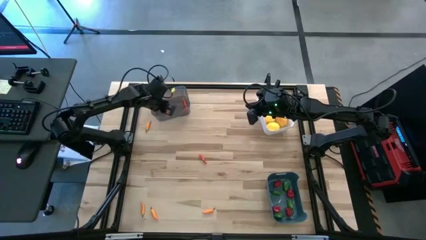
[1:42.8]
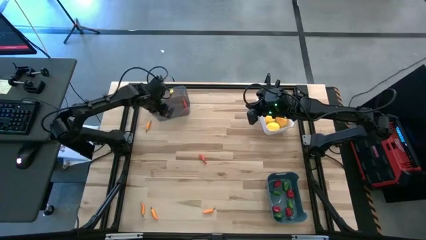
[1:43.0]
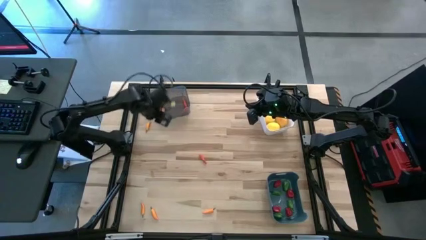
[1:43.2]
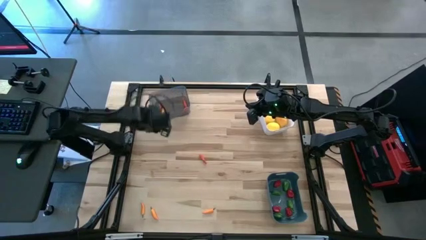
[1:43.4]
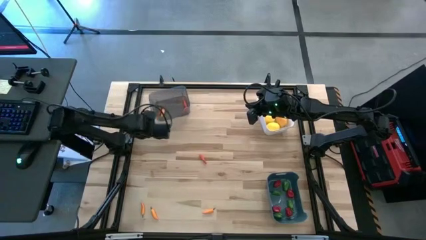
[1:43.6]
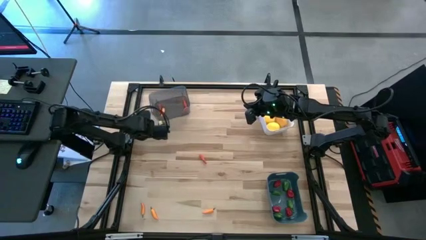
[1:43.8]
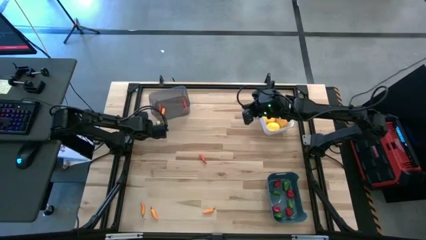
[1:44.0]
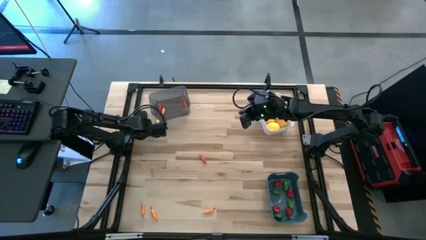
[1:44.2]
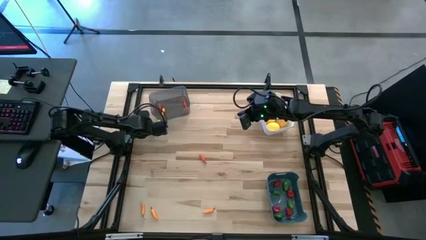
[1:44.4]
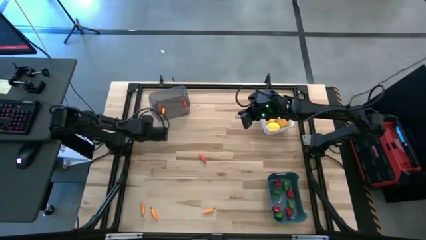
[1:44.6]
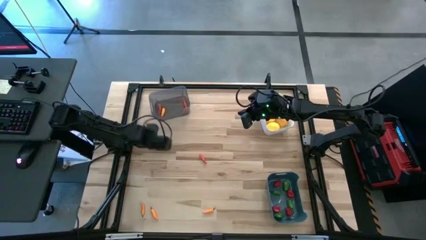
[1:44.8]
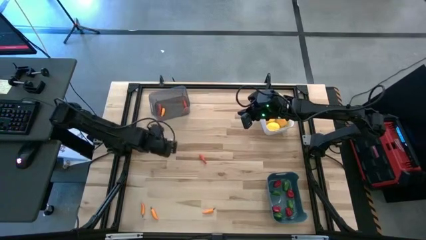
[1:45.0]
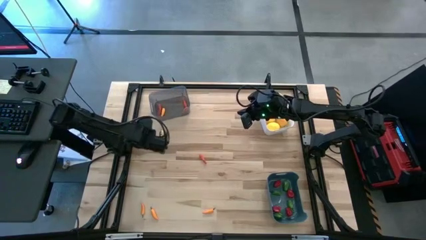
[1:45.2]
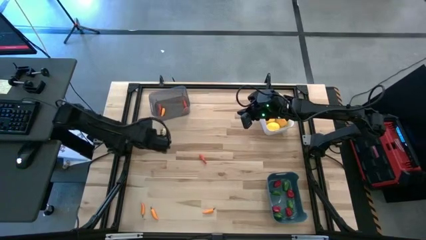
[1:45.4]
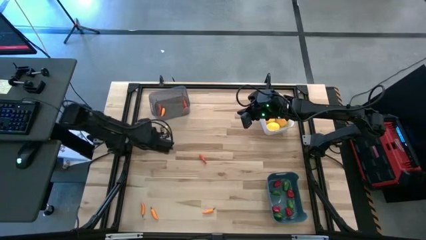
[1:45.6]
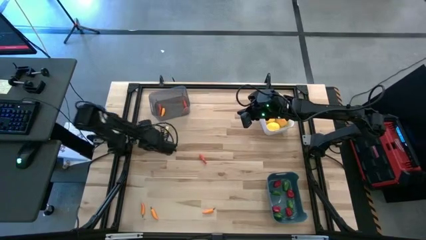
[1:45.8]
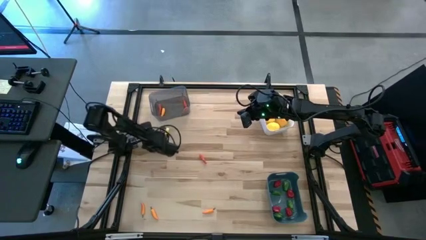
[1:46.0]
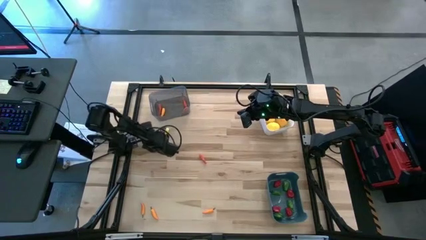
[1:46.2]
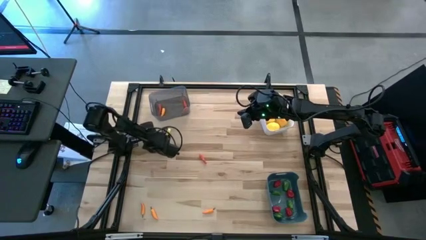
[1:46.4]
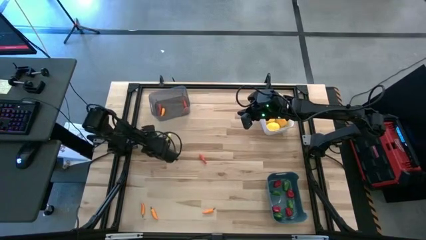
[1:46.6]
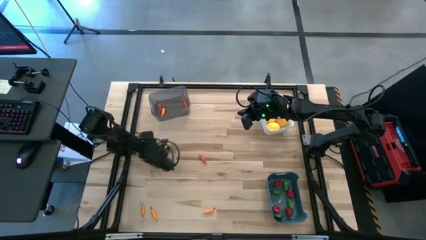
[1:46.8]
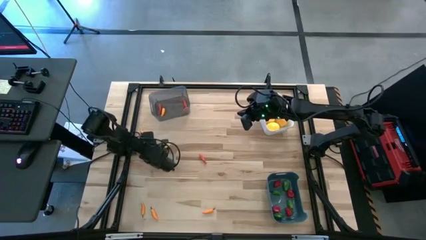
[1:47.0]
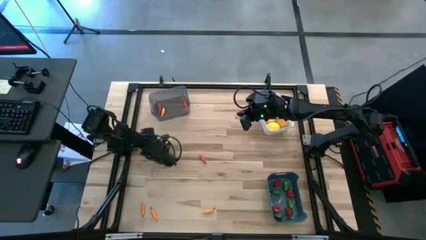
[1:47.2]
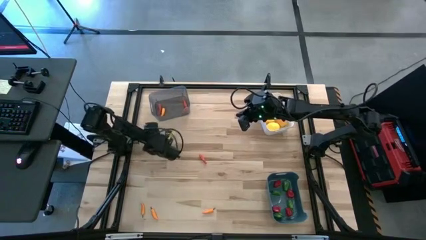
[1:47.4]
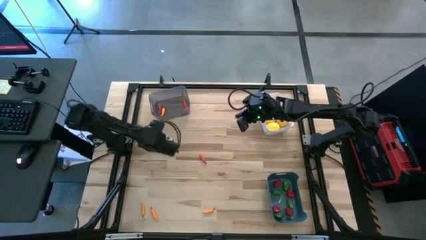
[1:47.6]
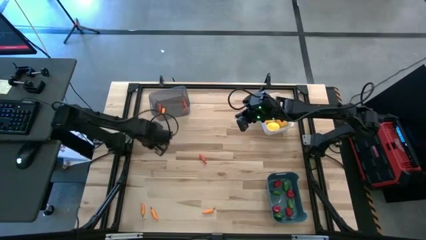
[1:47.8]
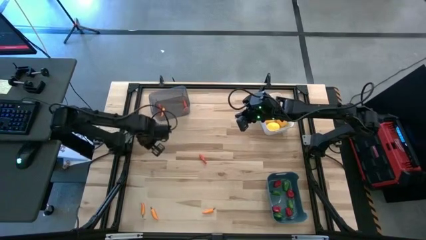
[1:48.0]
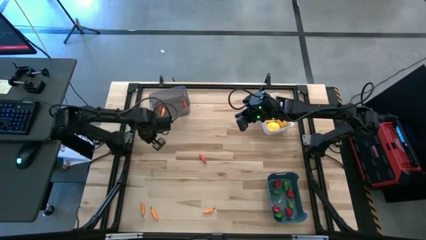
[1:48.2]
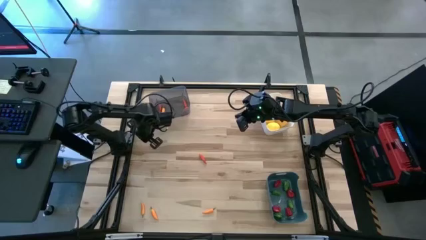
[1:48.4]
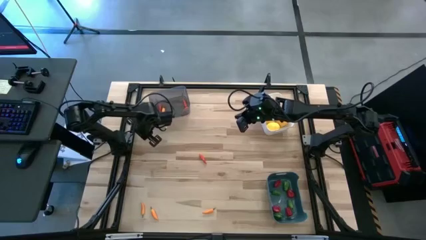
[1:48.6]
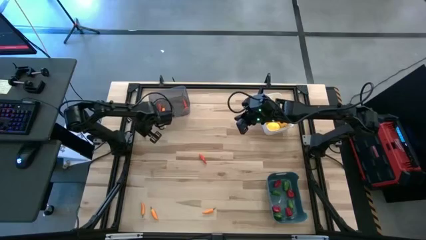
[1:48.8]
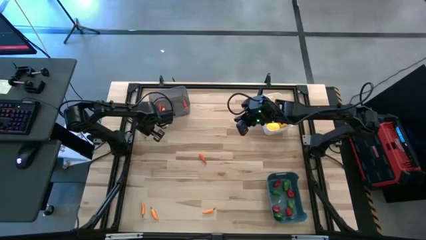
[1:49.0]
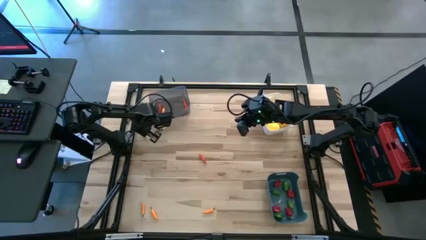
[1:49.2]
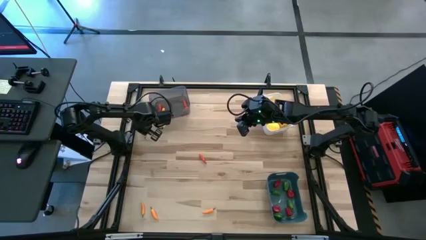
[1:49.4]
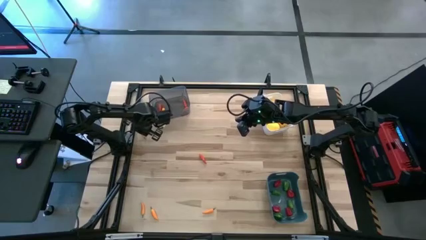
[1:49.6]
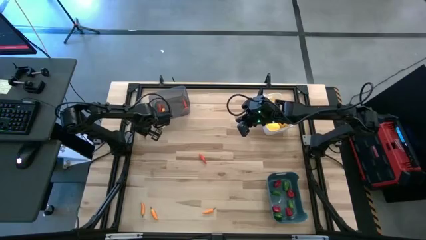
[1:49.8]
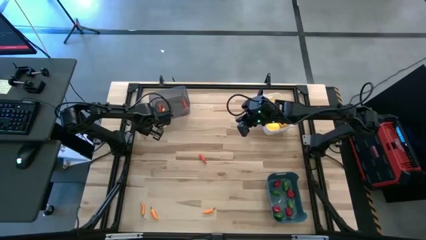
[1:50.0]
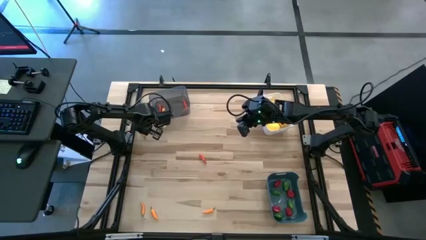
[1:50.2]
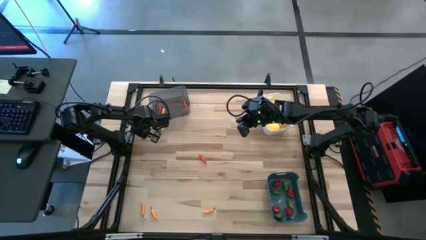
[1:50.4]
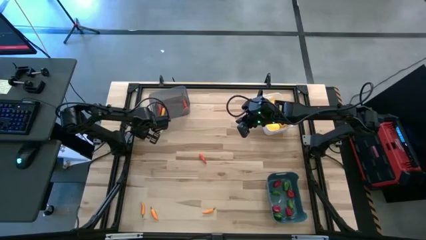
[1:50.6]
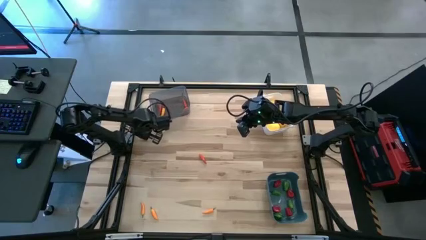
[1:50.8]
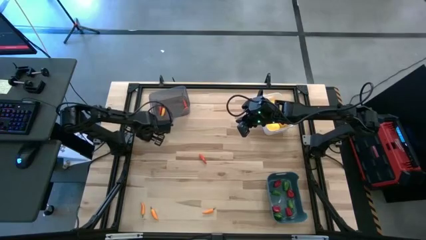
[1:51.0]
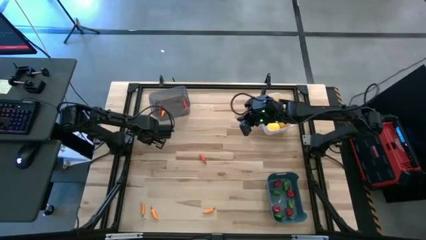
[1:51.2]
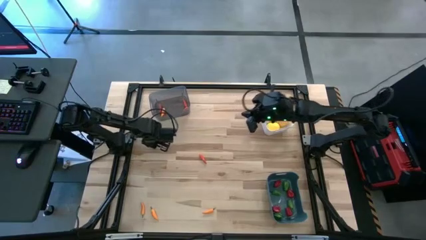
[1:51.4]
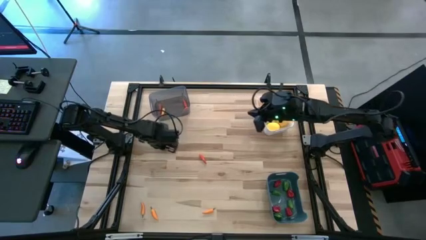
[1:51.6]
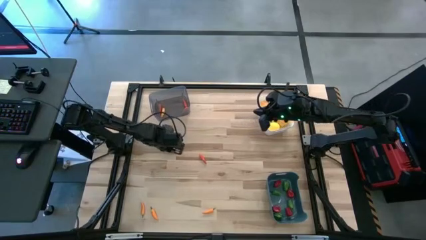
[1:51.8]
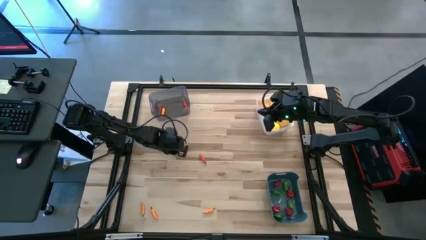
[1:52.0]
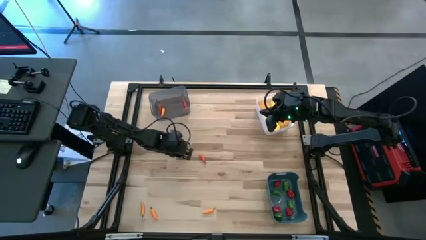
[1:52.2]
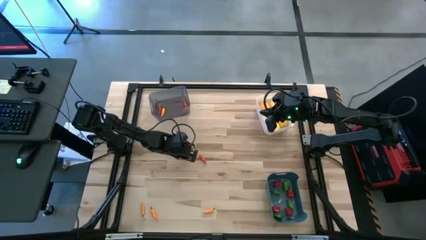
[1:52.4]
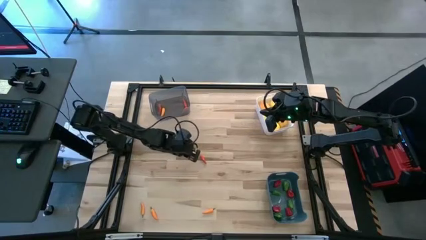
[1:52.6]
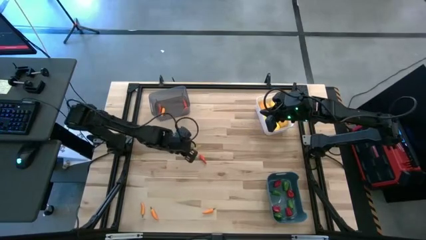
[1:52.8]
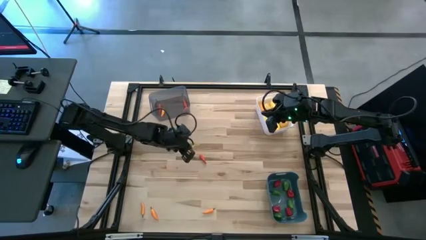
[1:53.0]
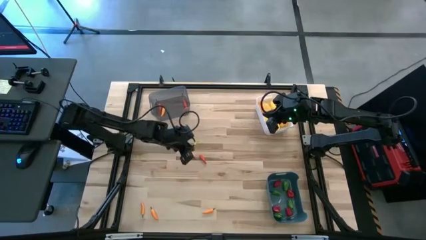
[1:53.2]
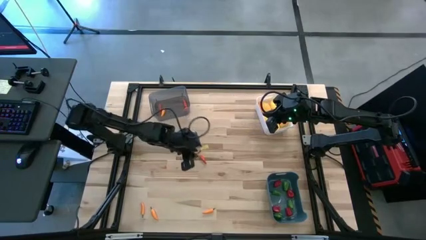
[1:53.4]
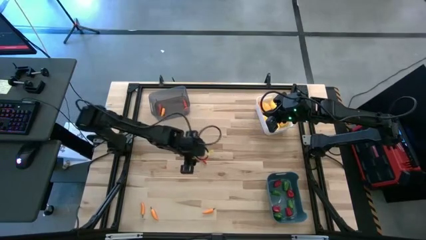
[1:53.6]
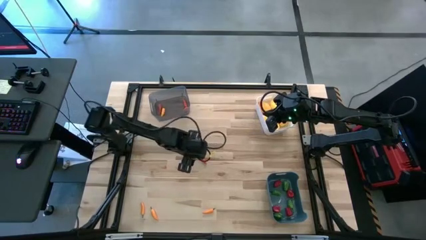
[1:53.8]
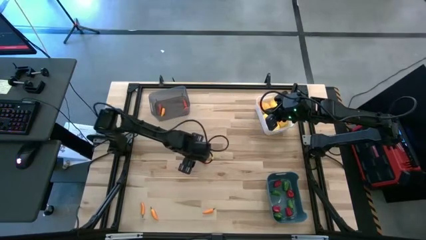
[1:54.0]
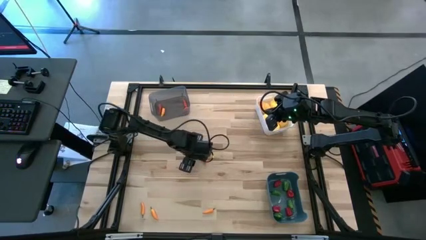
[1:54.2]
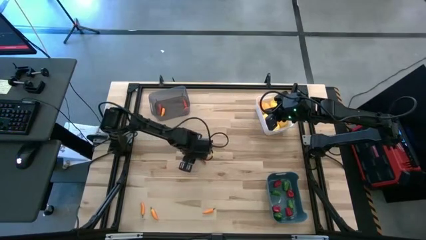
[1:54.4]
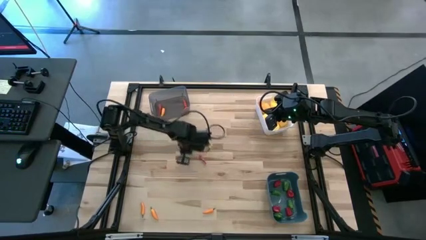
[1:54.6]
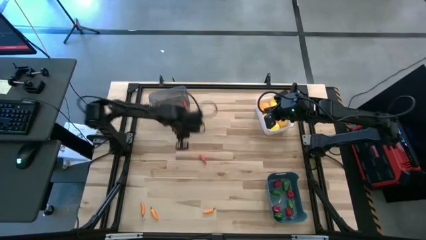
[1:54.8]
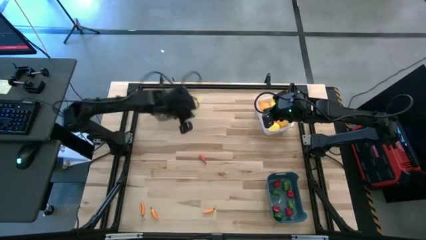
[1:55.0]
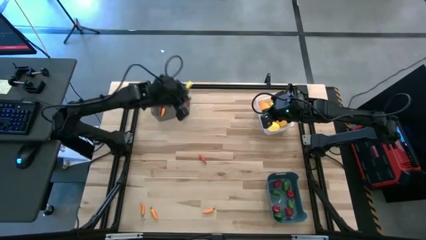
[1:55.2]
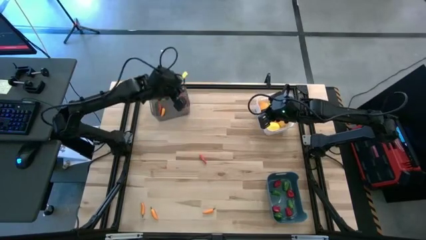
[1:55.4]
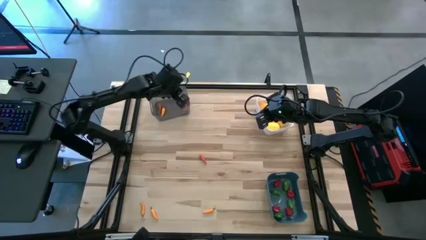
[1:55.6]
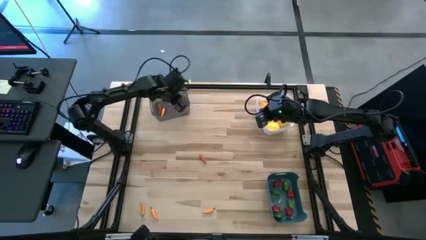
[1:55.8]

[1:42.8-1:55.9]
Task: Sort produce into baskets
Put the yellow chili pepper into the black bin

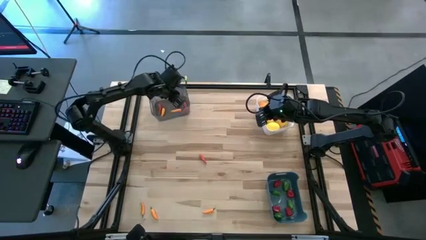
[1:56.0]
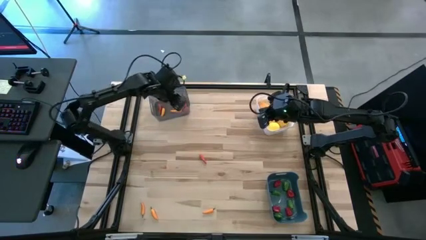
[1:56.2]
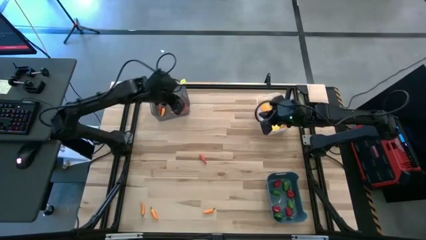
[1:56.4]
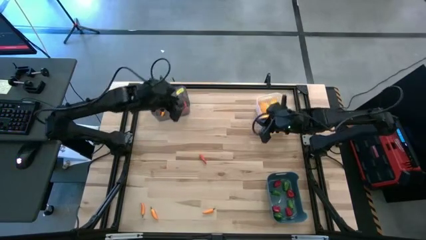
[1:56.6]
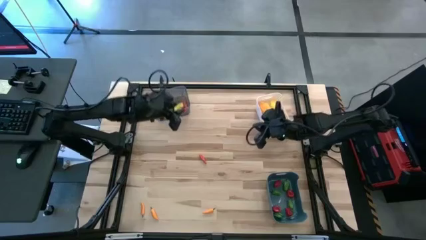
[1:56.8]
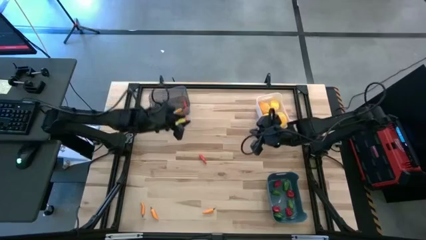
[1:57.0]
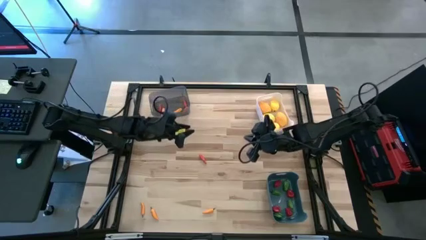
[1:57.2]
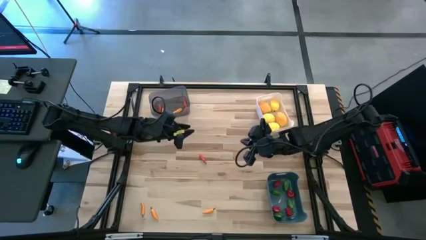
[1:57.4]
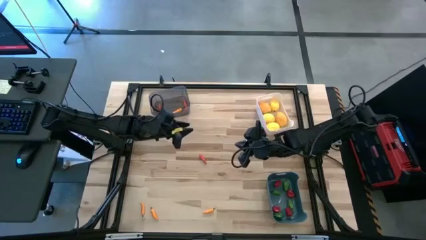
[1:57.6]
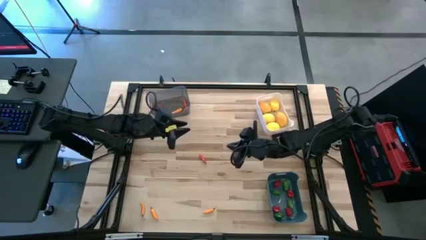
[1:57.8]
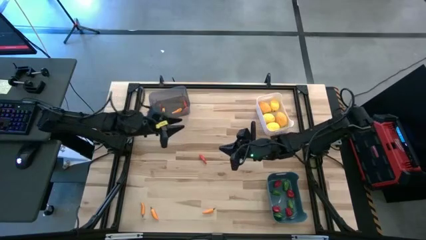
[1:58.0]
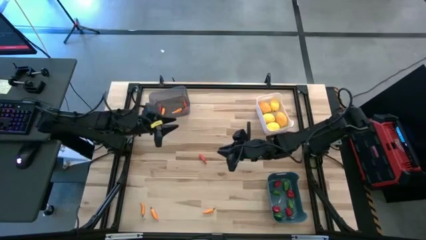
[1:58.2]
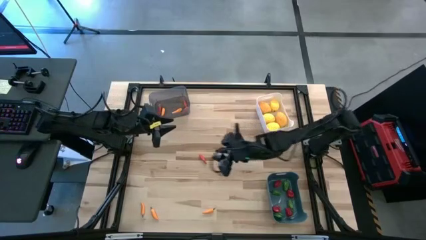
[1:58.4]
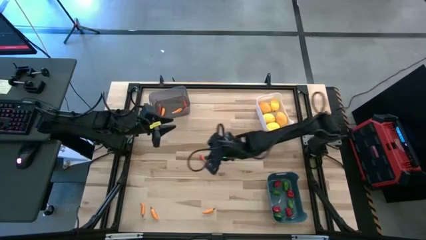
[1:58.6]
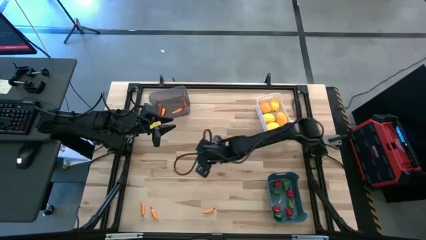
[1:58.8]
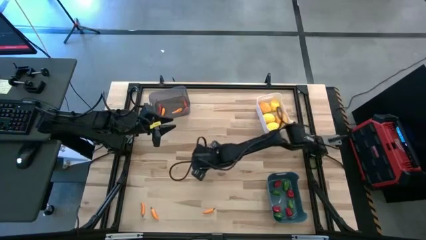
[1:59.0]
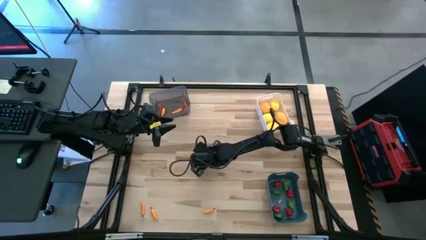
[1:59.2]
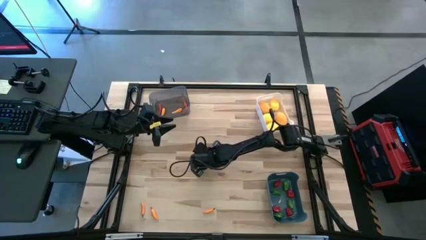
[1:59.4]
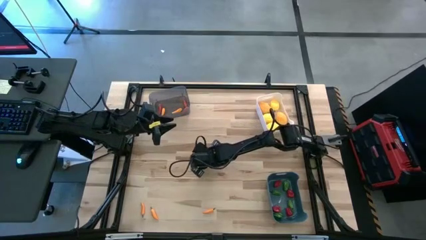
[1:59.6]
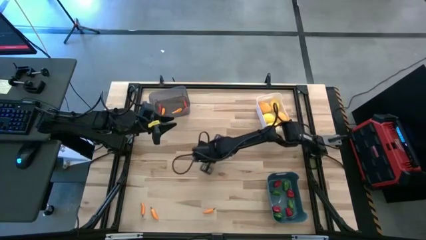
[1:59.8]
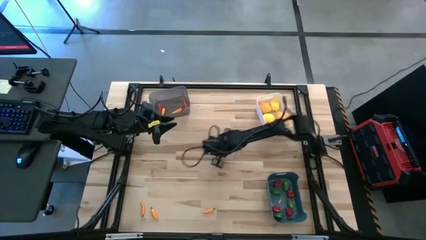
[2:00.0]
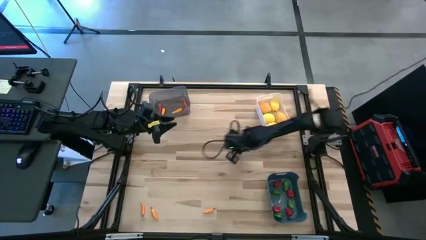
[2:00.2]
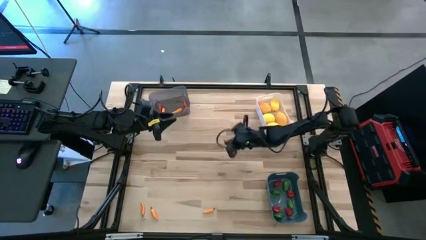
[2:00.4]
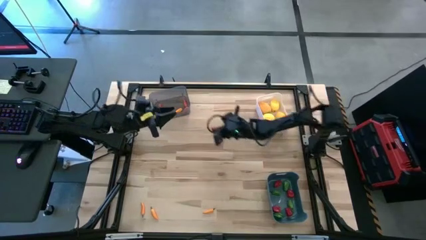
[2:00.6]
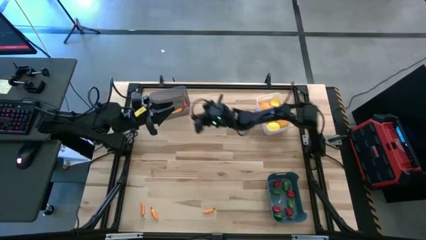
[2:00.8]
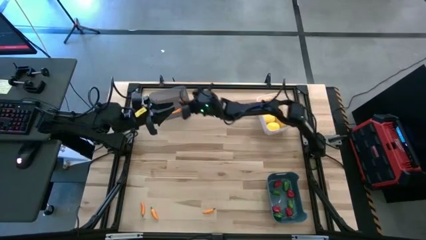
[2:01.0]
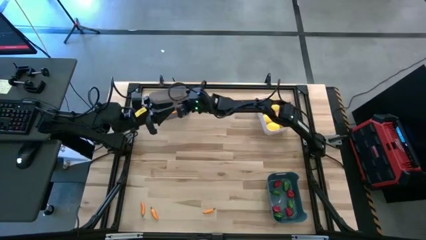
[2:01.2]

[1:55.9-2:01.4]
Put the orange chili pepper into the black bin
